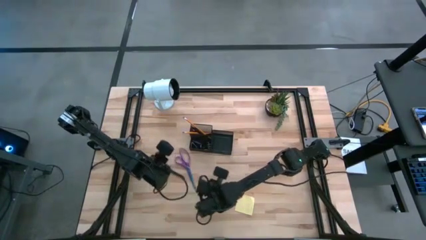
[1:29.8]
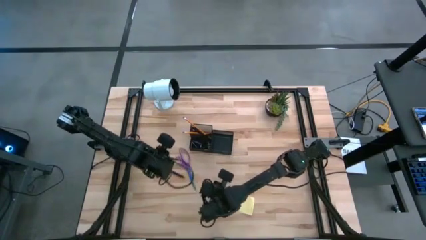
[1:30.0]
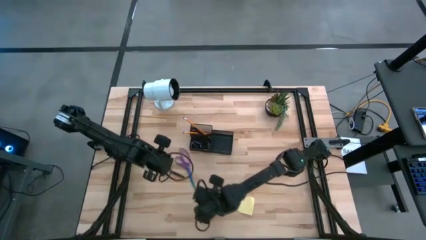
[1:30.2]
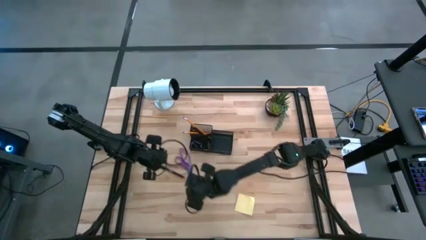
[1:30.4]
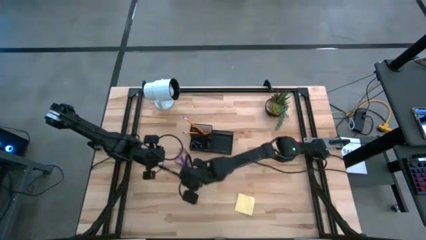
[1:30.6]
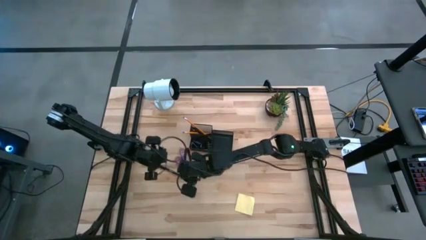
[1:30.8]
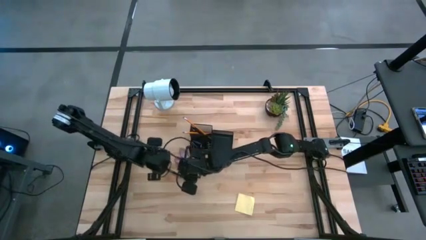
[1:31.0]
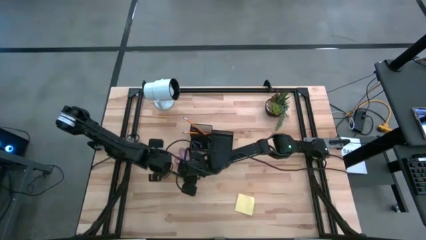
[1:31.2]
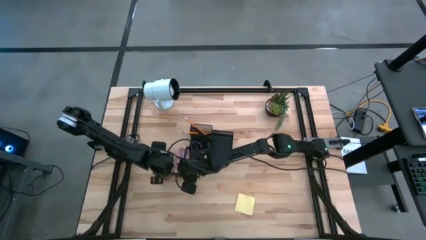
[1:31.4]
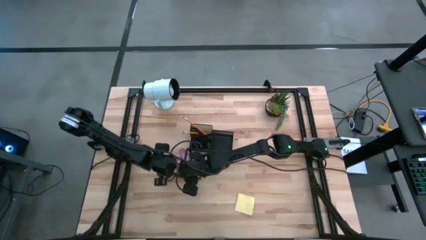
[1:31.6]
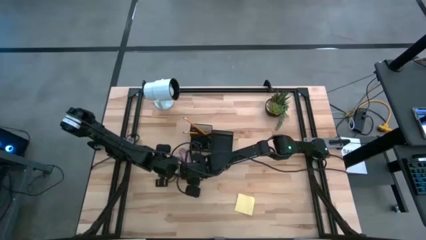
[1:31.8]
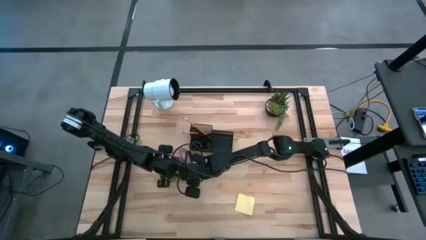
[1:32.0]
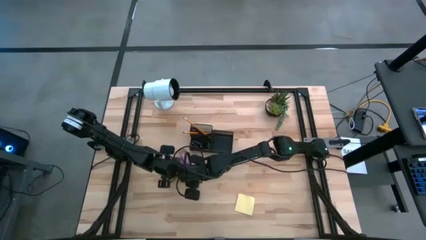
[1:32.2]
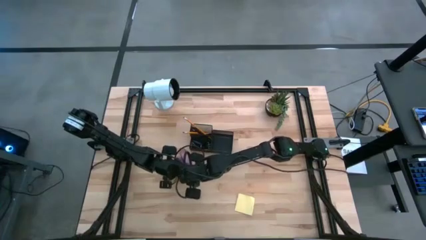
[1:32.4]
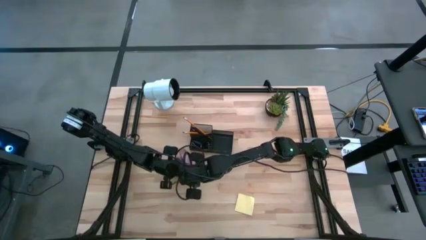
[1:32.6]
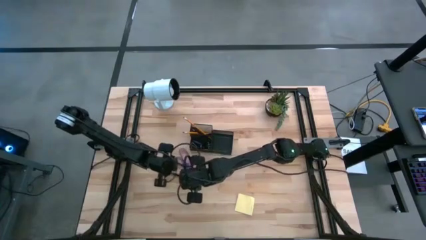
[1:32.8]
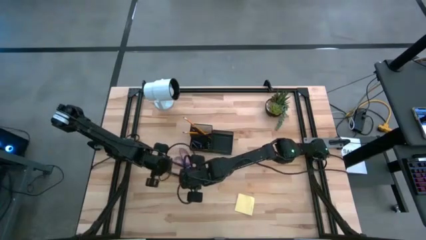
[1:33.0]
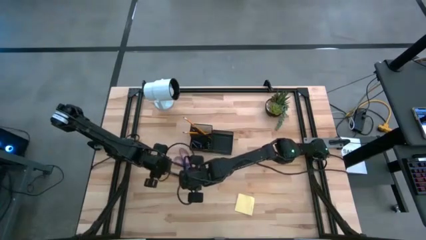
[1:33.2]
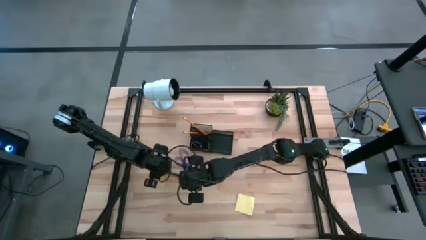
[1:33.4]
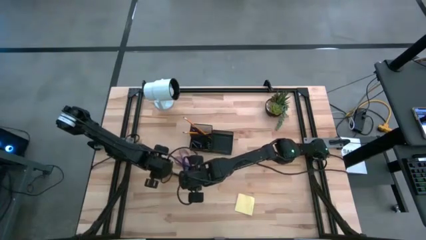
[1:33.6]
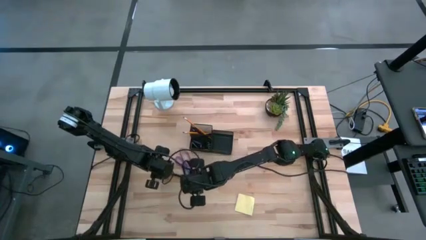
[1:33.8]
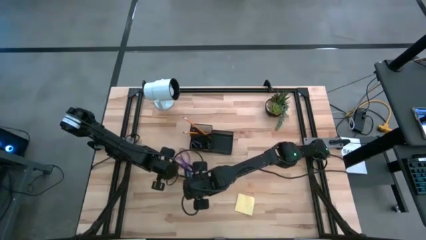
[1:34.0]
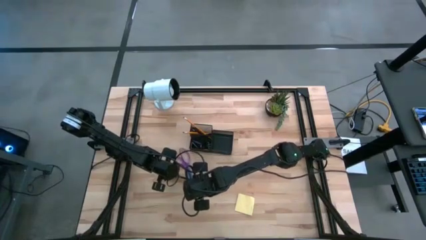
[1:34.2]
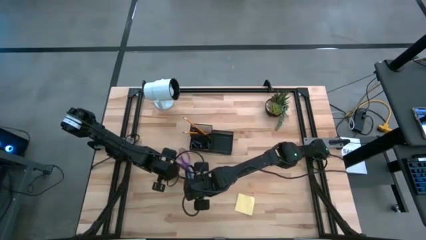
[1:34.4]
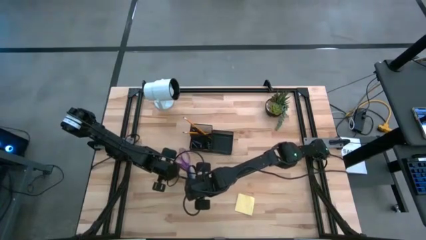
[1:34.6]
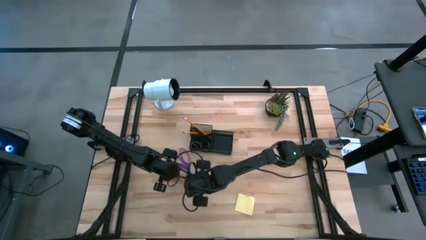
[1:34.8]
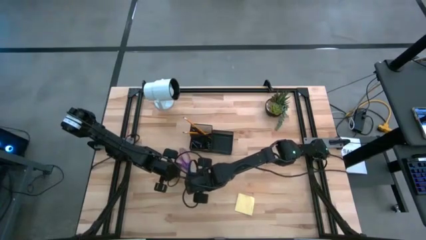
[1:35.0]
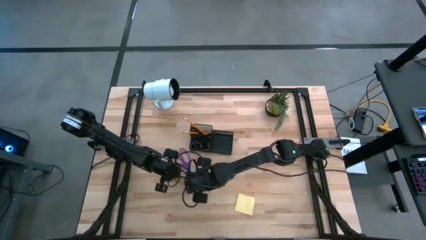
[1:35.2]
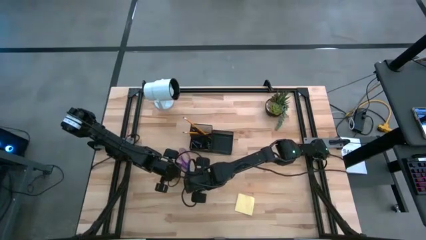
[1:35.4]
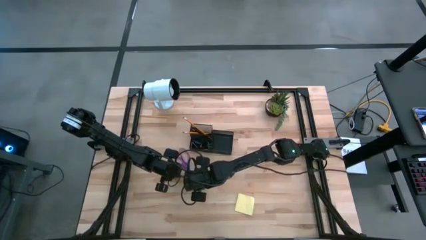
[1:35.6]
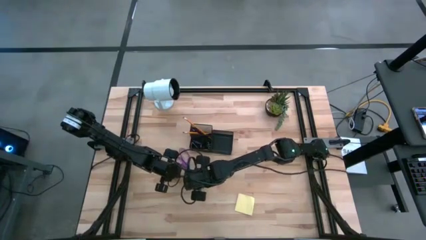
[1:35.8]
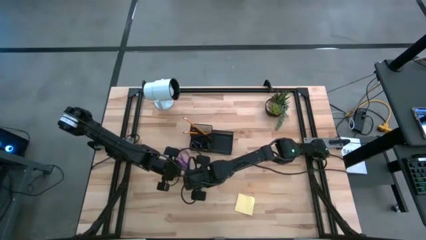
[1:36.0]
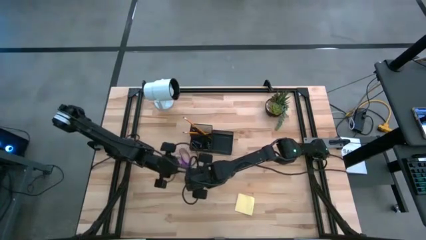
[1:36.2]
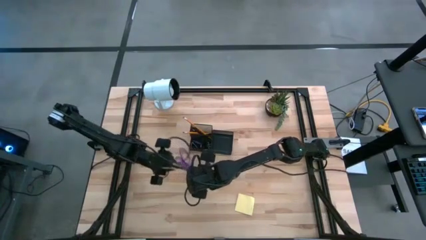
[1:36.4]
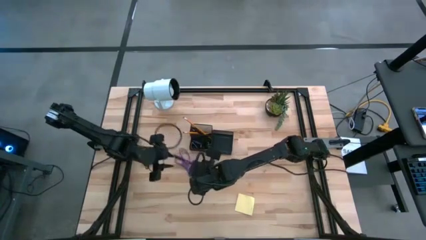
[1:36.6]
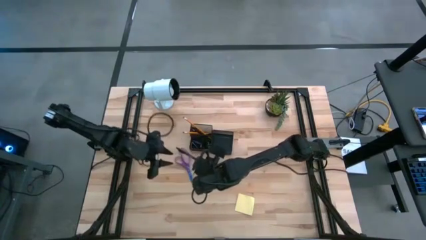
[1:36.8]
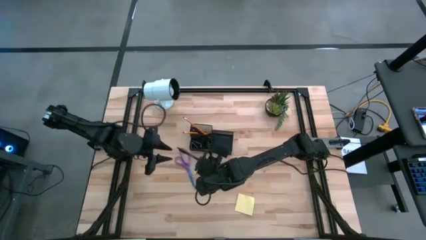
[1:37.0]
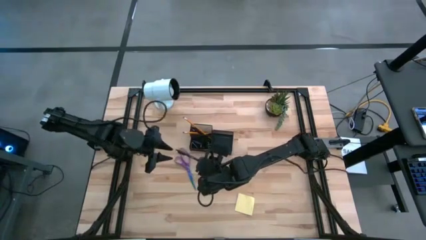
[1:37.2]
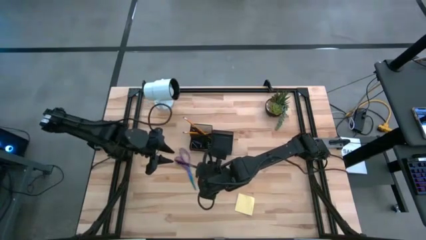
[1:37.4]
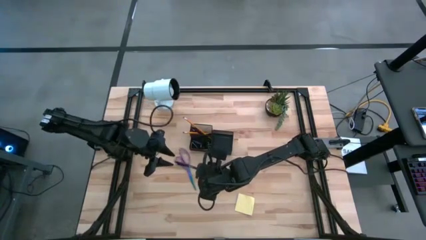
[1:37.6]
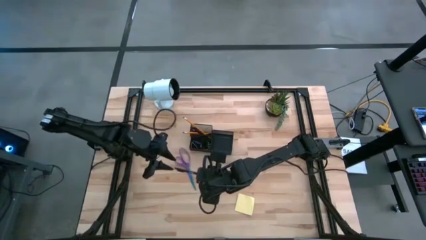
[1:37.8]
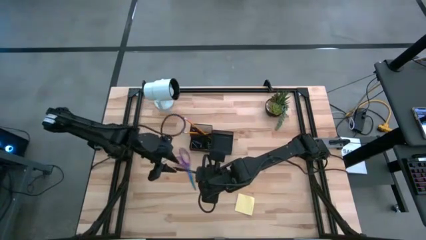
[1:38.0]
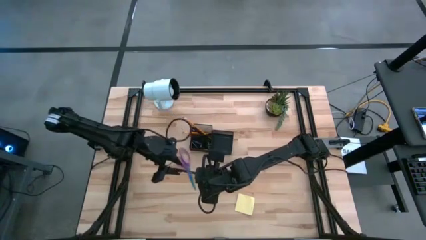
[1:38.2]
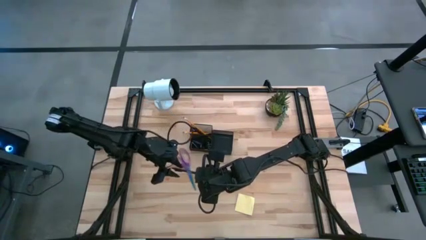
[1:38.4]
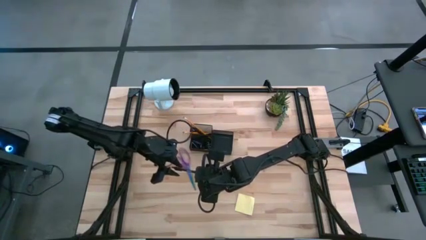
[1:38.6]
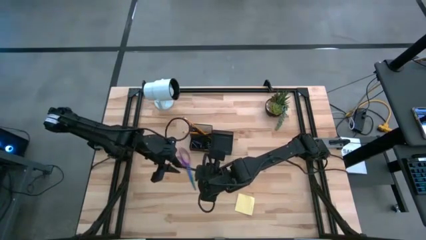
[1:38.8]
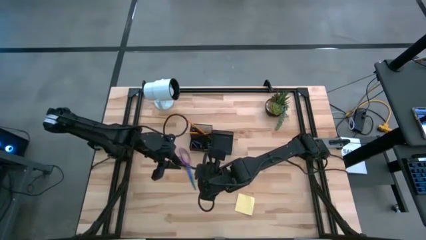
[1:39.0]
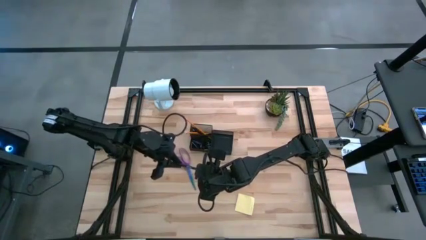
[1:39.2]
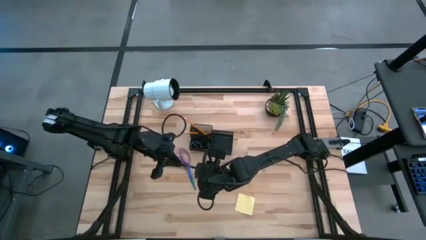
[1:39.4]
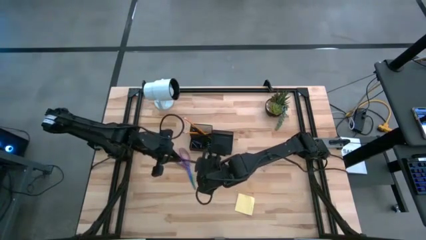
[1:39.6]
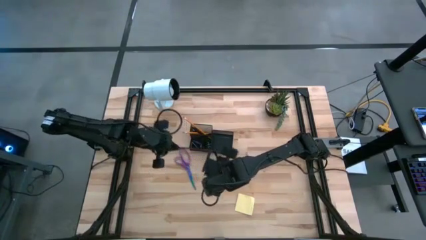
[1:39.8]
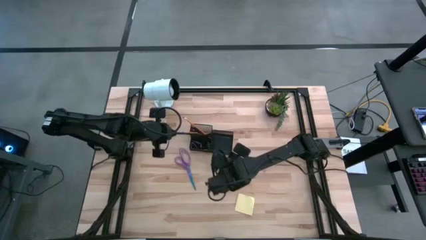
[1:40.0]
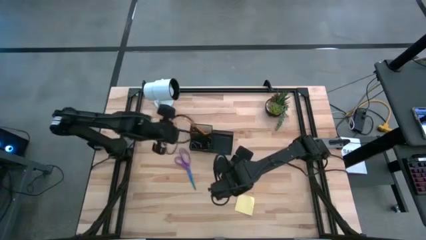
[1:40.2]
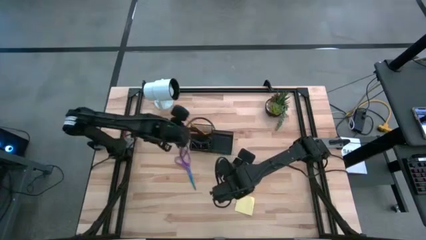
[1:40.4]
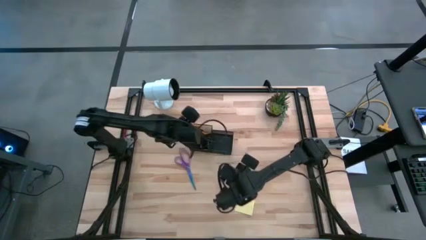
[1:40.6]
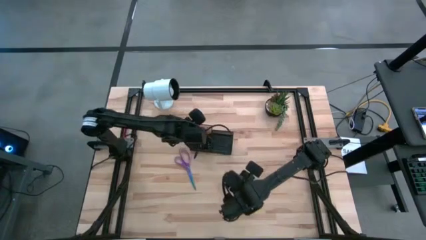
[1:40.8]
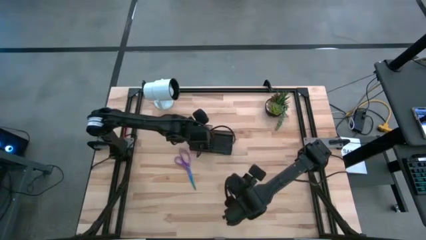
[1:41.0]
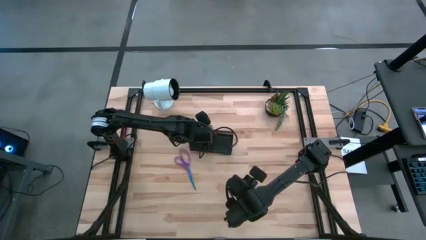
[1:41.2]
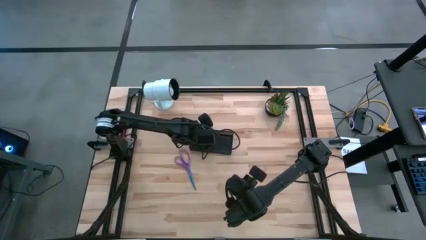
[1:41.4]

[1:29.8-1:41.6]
Task: Pick and place office supplies into organizer
Put the black pen into the black desk organizer

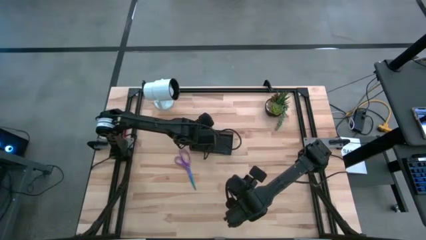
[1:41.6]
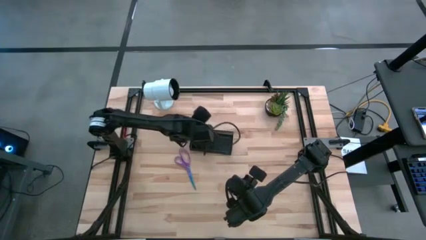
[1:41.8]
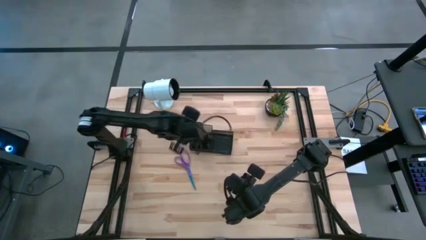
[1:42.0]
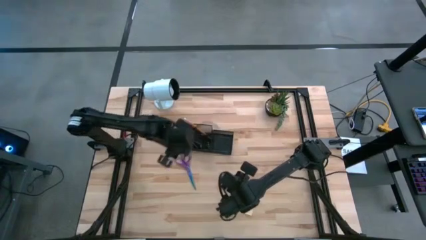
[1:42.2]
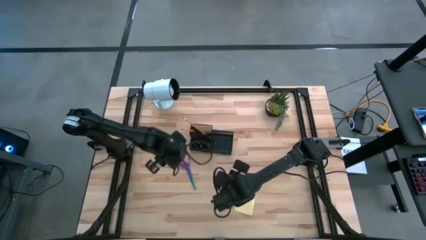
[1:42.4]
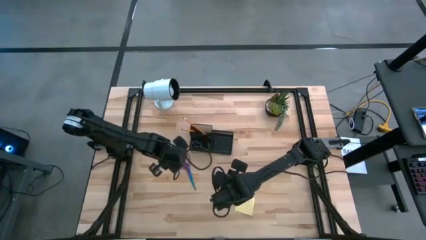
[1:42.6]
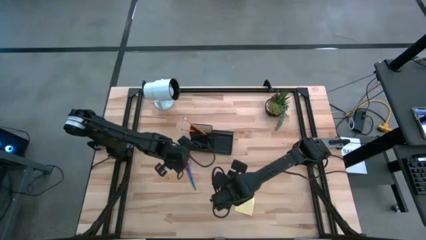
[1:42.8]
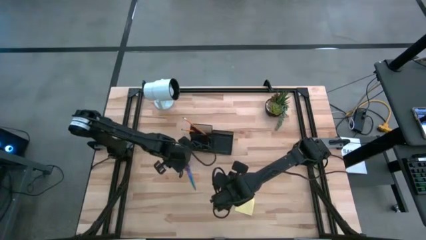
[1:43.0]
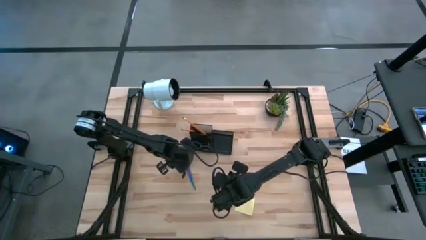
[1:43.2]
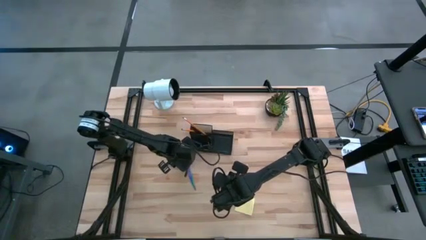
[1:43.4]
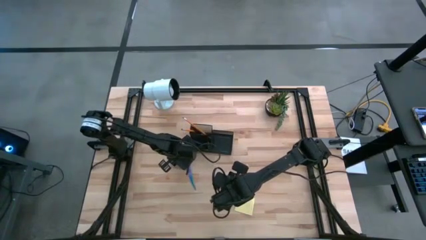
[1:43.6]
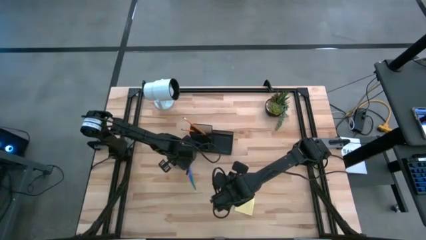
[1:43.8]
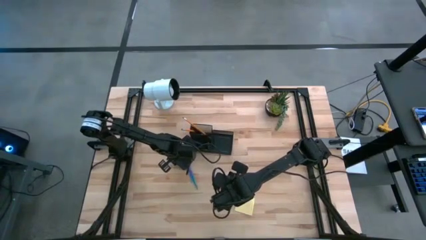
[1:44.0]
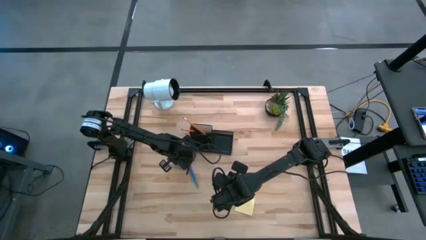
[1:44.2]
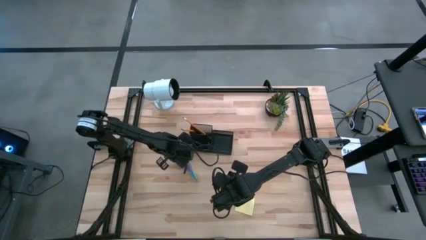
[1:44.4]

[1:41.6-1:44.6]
Put the violet scissors into the black desk organizer
